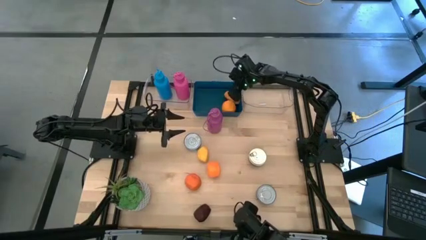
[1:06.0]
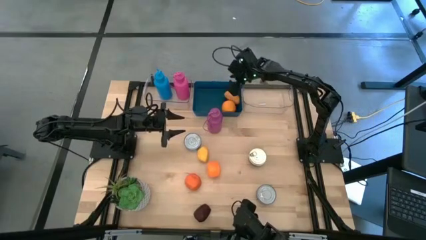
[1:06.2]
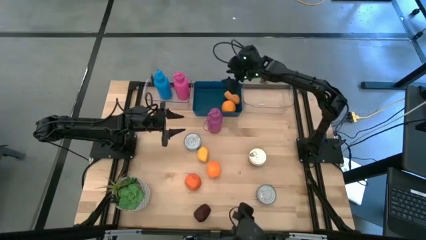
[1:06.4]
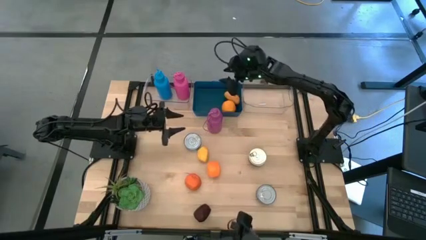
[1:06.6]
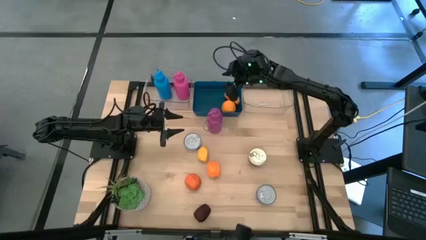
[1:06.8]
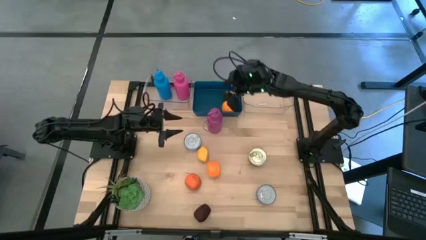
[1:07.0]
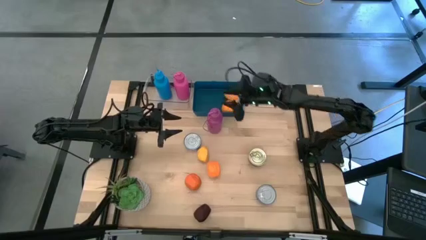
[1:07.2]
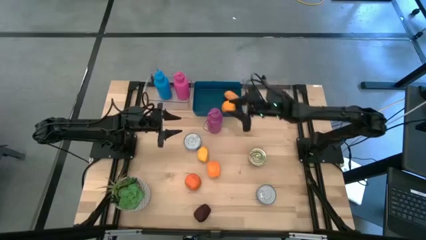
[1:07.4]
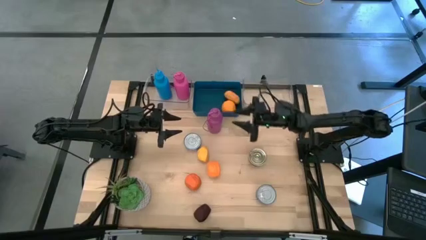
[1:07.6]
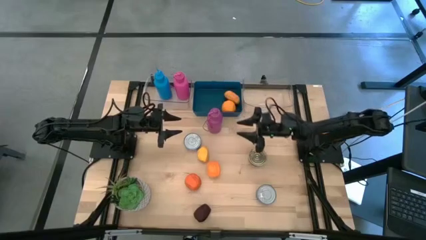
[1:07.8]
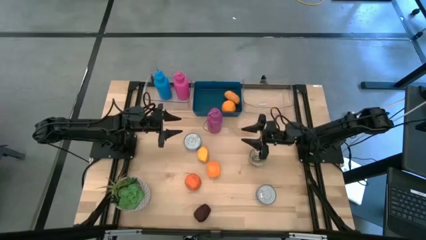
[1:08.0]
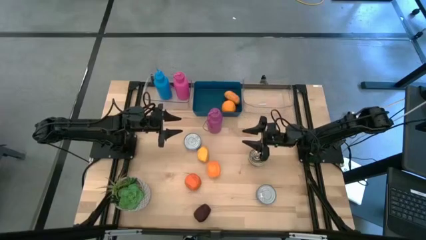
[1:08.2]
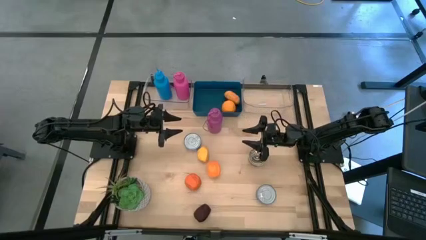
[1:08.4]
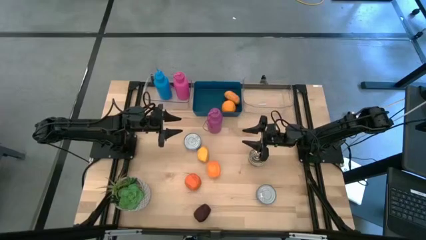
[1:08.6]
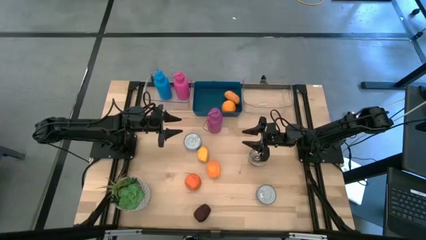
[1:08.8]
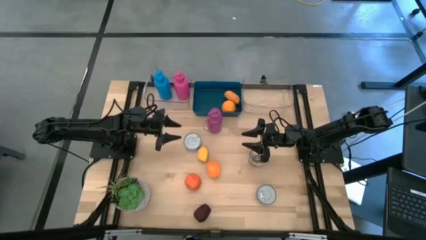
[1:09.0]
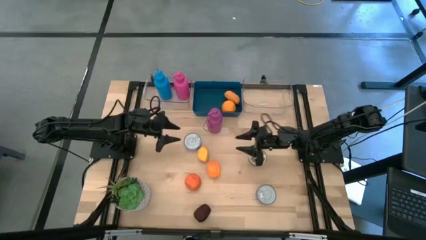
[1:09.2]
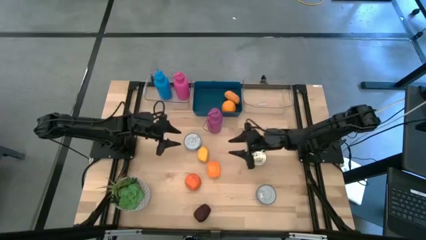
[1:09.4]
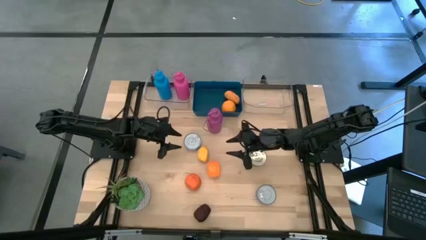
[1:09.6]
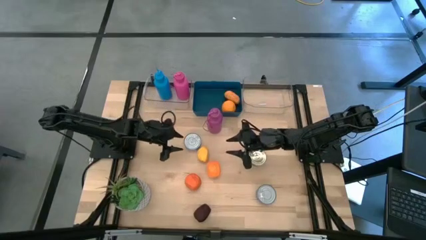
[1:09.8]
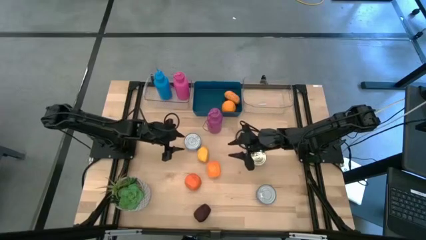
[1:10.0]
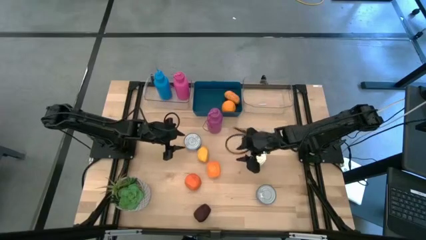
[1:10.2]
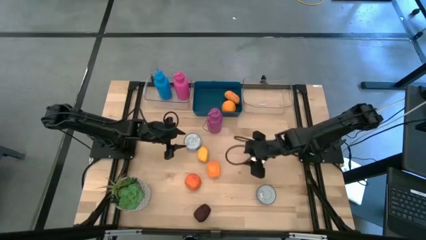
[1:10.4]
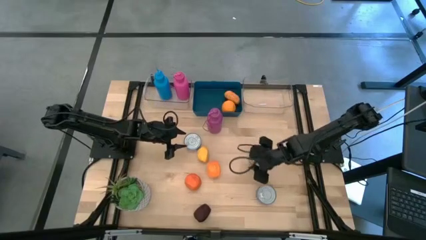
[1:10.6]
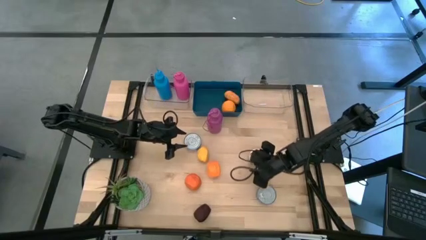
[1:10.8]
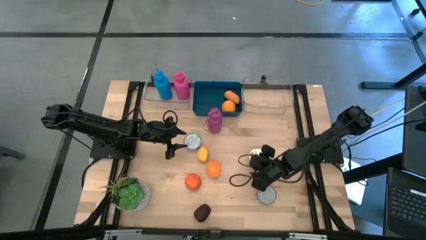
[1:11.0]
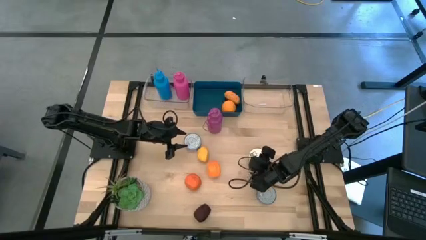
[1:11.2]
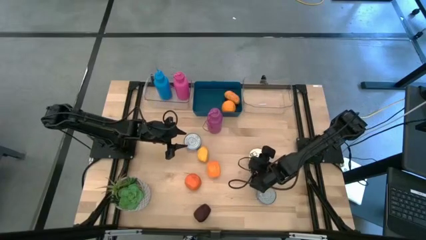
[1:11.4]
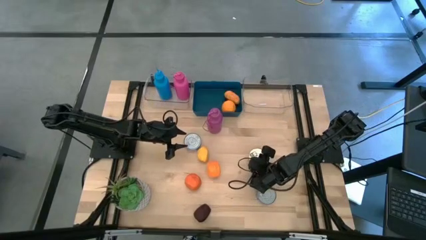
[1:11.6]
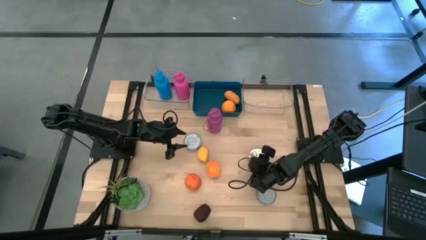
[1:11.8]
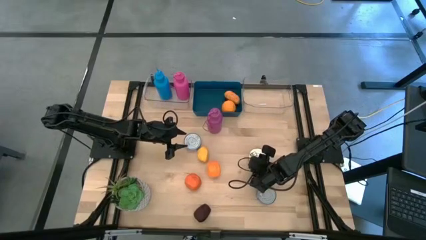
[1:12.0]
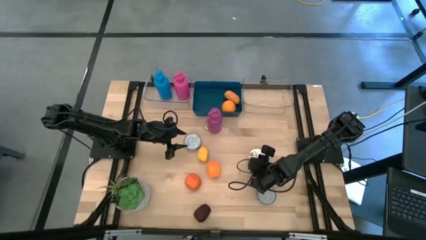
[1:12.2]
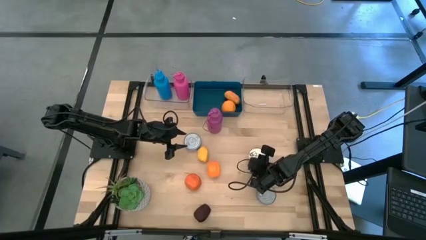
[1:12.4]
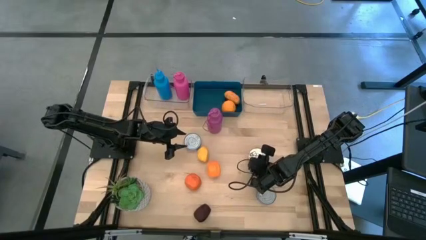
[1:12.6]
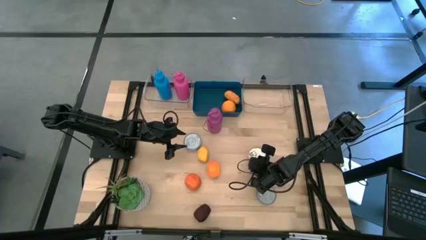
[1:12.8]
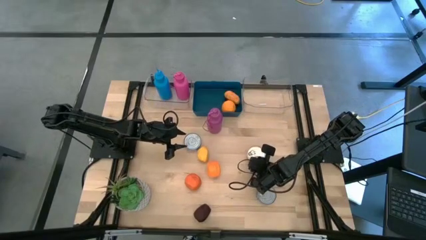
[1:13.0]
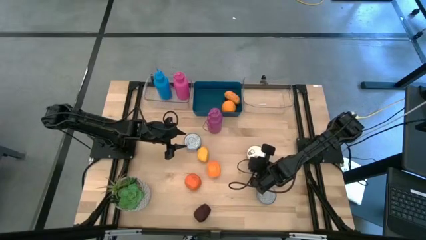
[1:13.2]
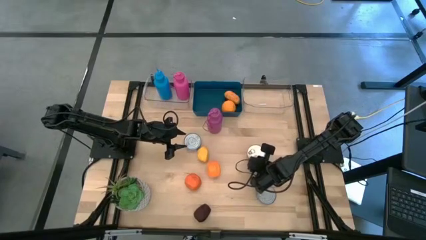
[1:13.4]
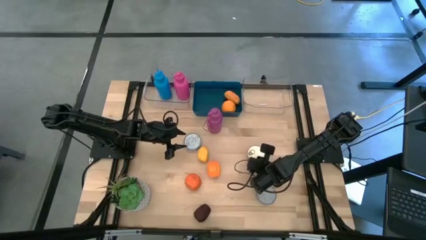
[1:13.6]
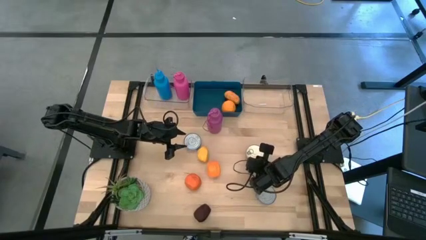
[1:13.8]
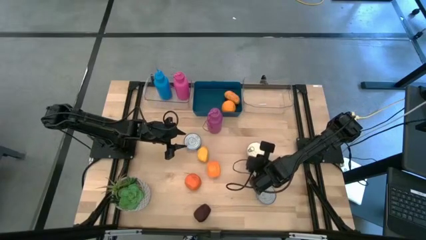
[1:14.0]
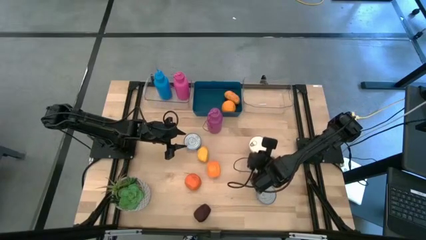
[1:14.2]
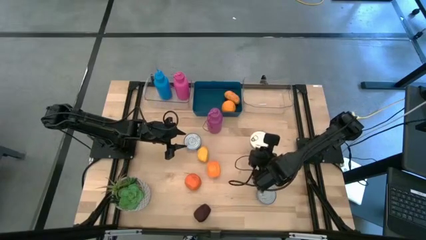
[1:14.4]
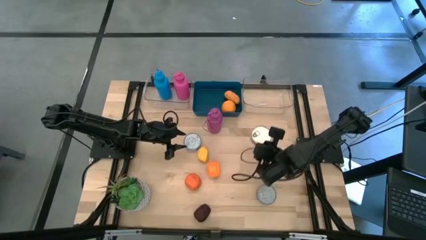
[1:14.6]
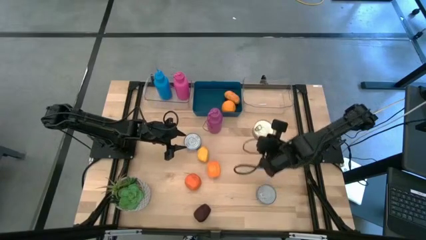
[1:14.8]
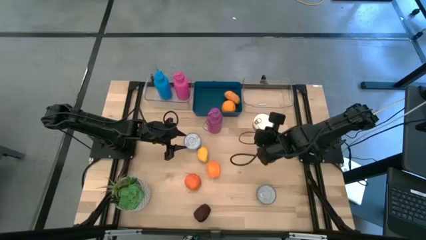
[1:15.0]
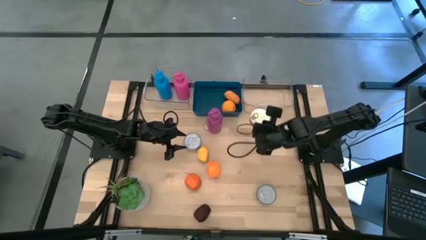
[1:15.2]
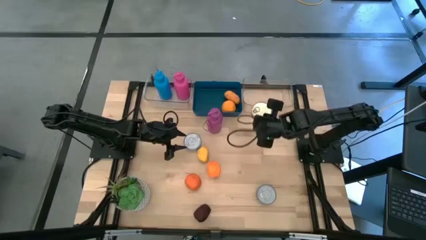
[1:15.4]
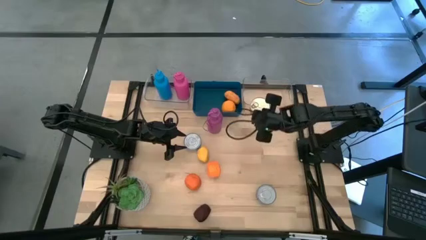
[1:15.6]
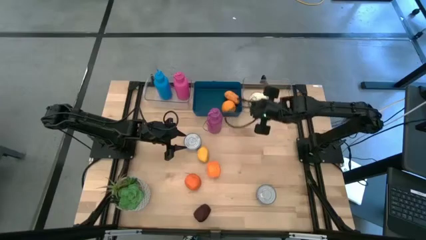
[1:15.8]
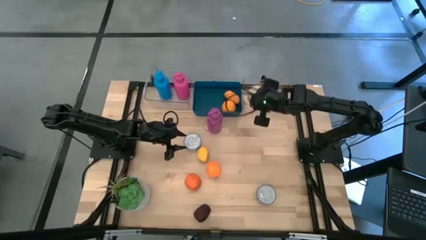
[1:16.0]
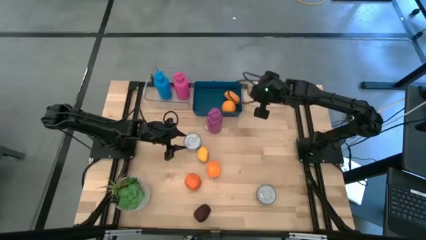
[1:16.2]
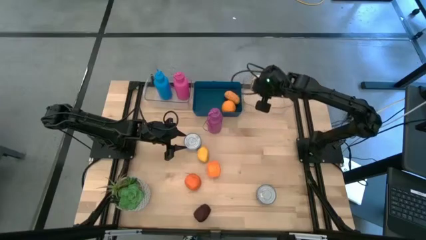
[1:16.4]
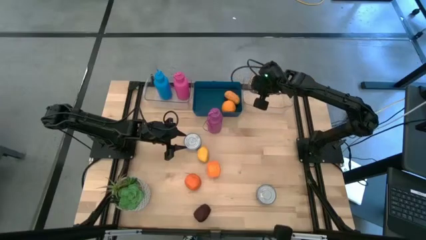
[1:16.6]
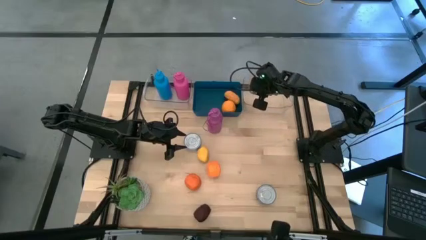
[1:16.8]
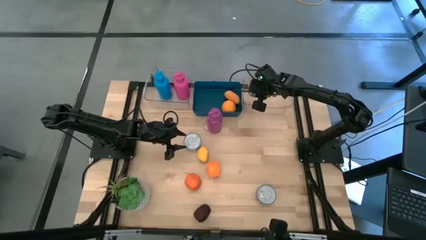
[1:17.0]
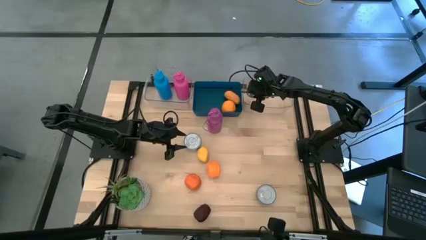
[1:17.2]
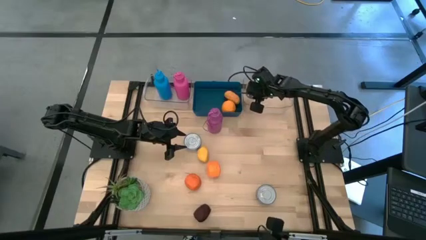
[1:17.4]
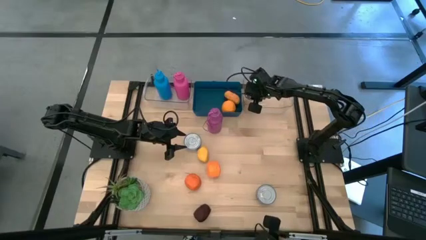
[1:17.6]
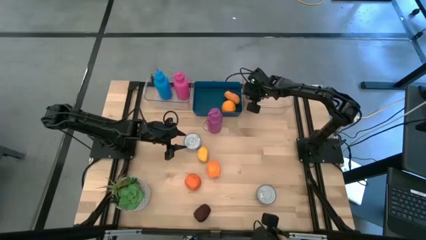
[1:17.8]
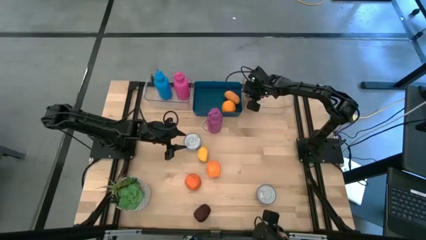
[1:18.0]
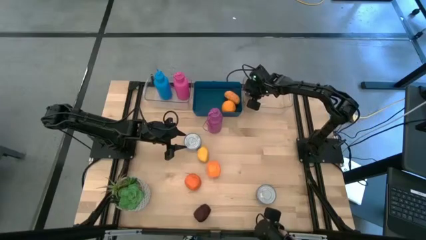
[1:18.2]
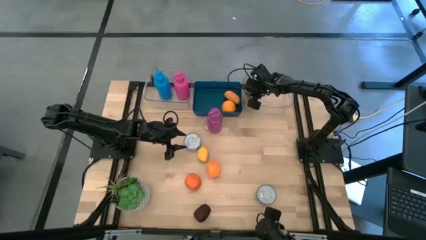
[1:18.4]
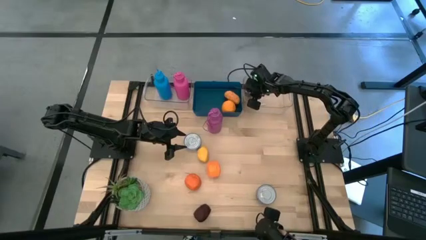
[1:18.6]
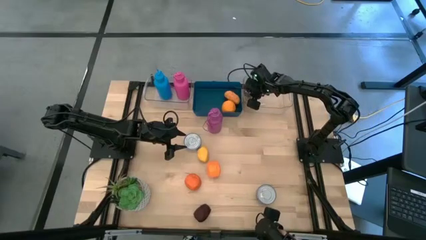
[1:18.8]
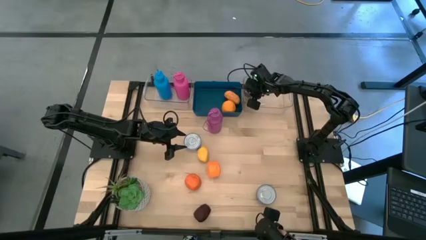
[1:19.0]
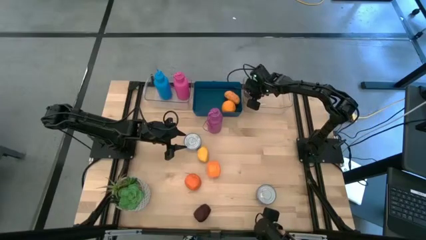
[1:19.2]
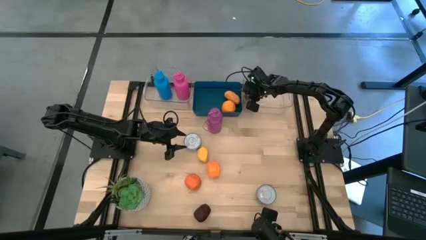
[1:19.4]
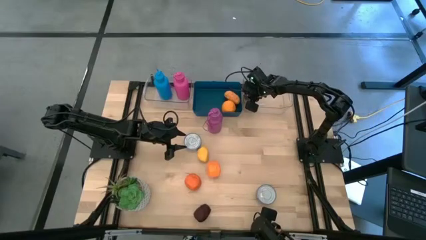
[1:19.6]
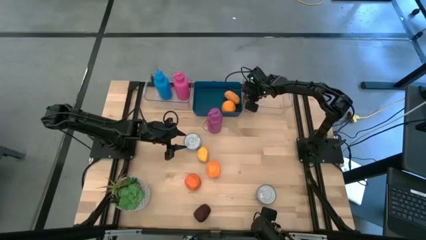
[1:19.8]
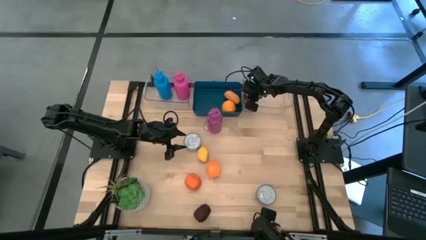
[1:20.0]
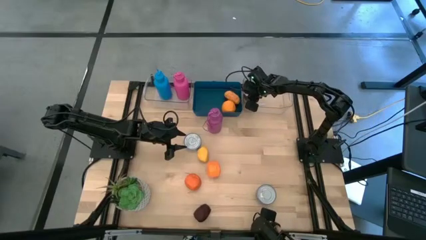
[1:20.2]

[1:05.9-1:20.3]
Task: Pick & Place Food Item
Put the blue pink can into the right transparent bin
